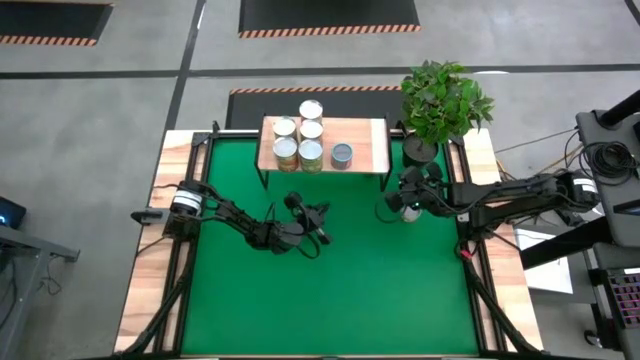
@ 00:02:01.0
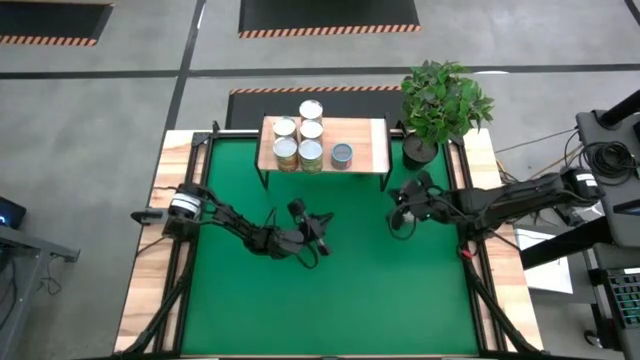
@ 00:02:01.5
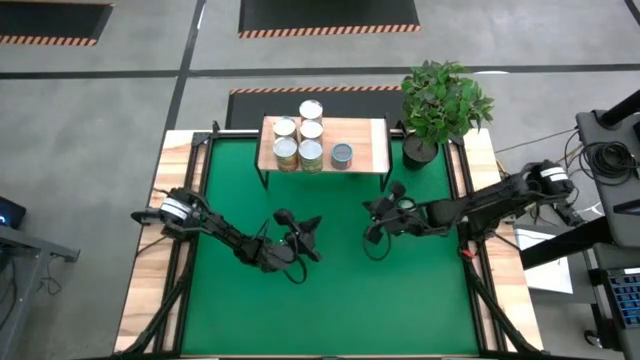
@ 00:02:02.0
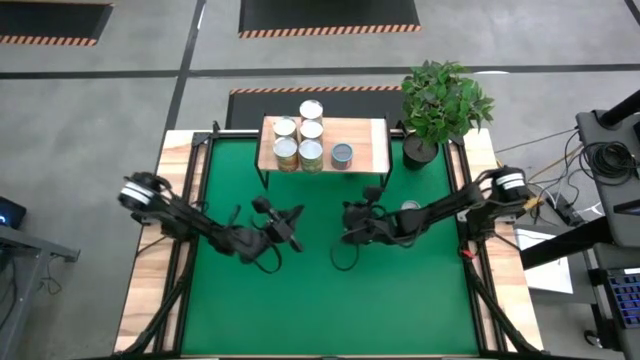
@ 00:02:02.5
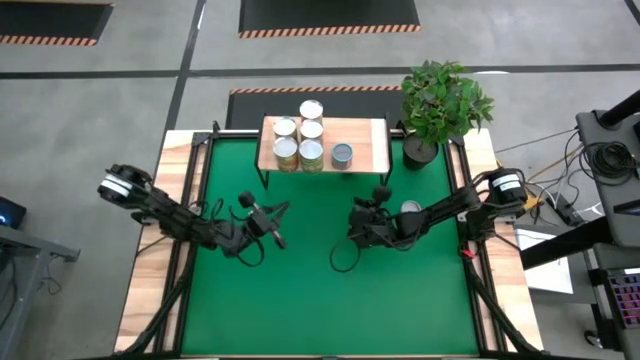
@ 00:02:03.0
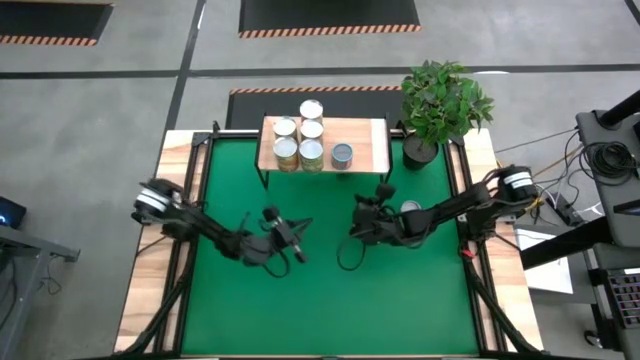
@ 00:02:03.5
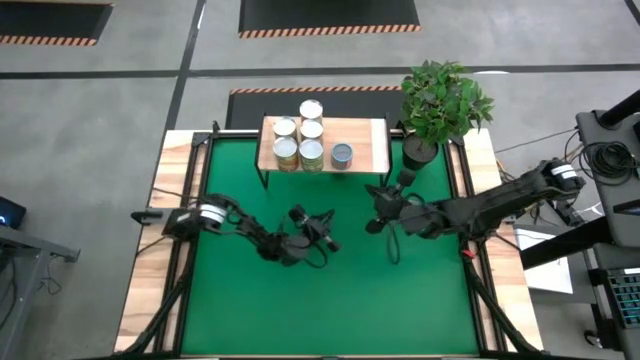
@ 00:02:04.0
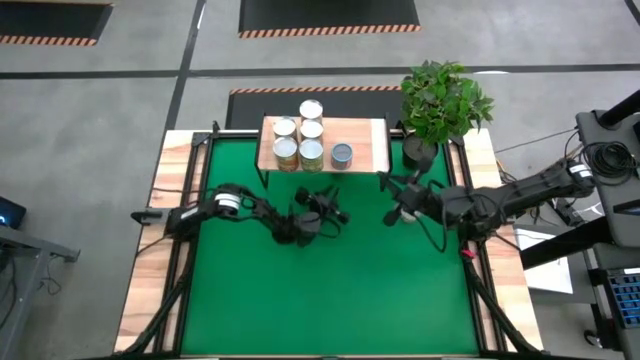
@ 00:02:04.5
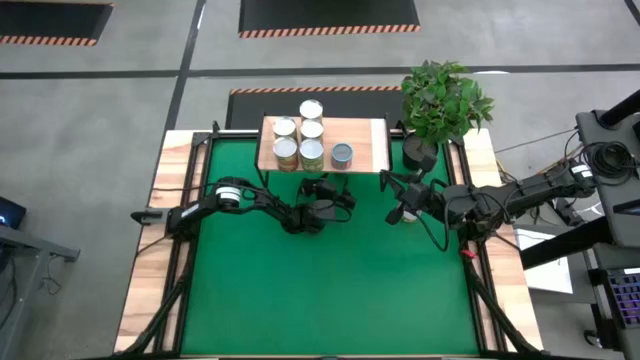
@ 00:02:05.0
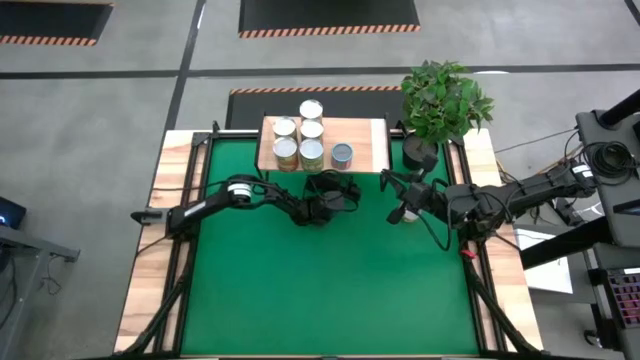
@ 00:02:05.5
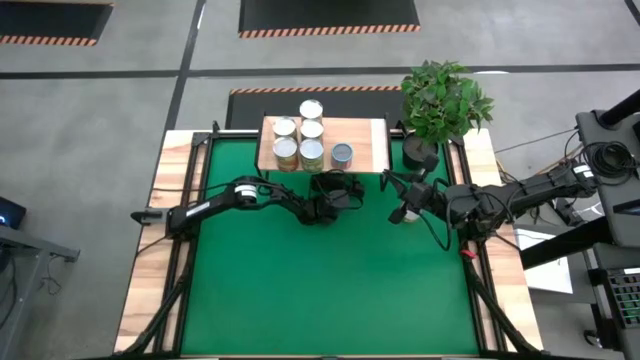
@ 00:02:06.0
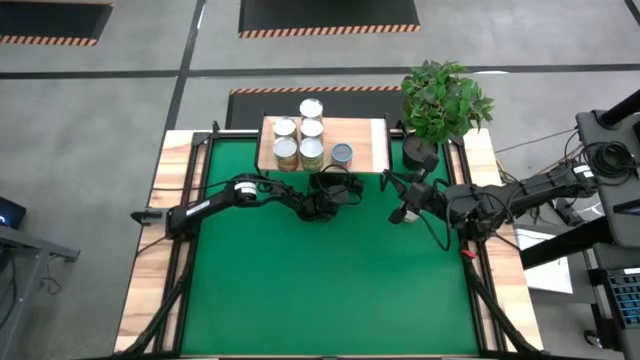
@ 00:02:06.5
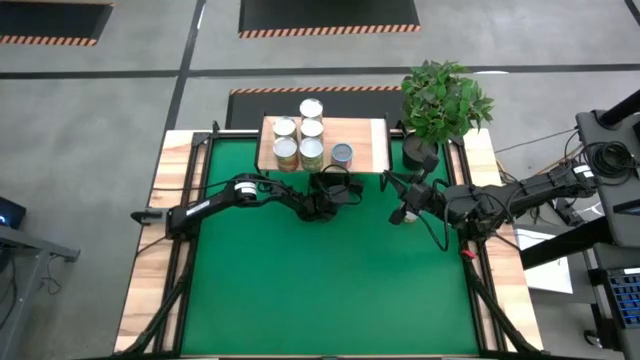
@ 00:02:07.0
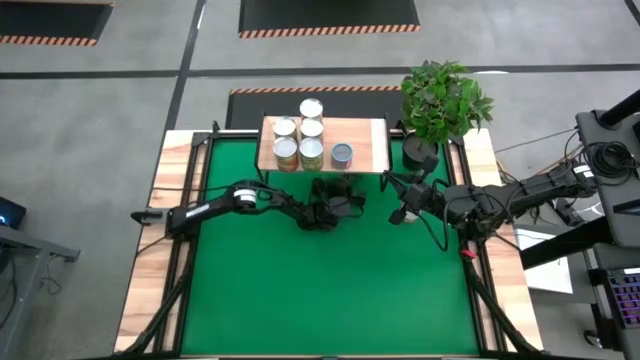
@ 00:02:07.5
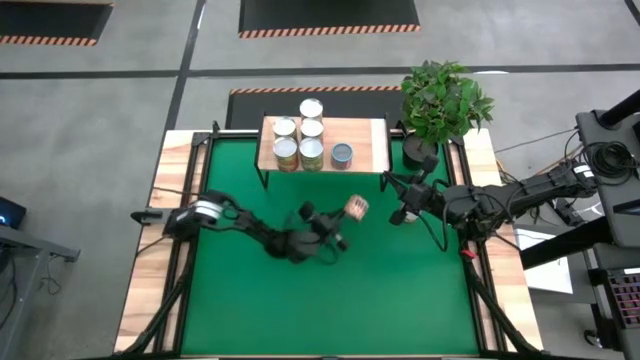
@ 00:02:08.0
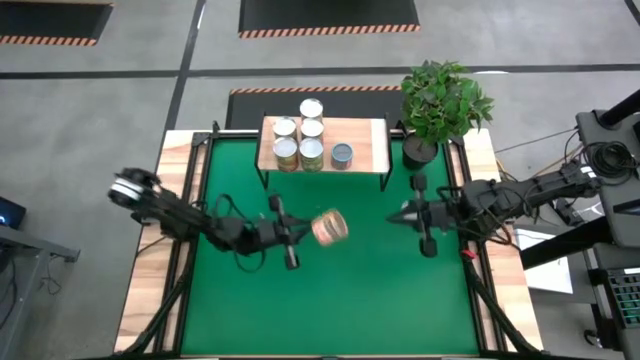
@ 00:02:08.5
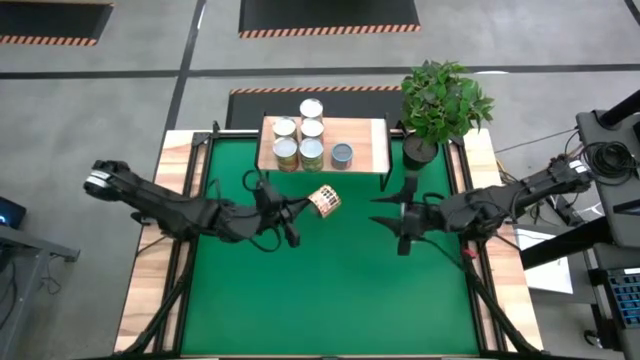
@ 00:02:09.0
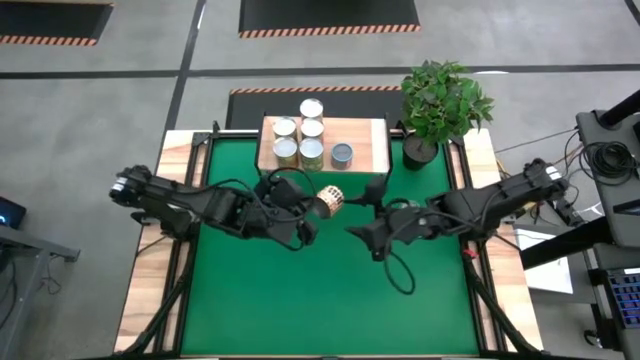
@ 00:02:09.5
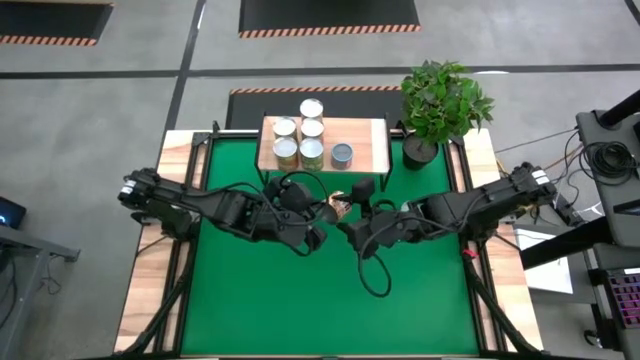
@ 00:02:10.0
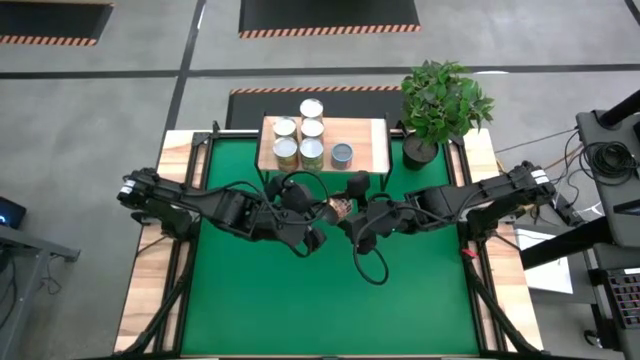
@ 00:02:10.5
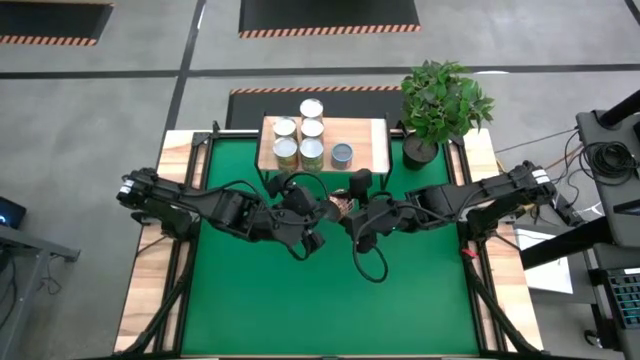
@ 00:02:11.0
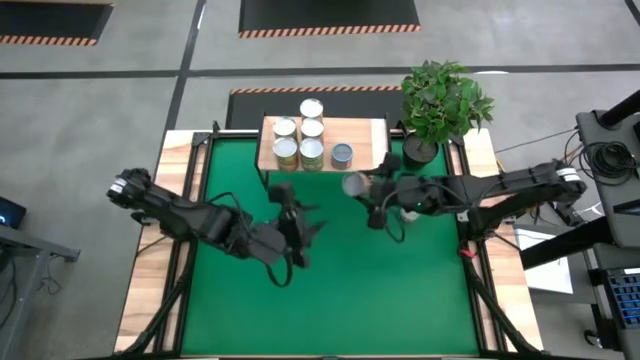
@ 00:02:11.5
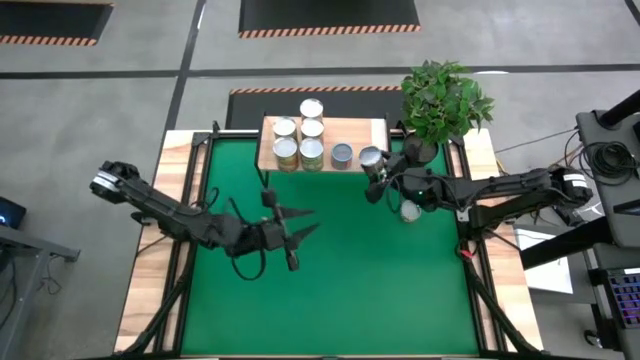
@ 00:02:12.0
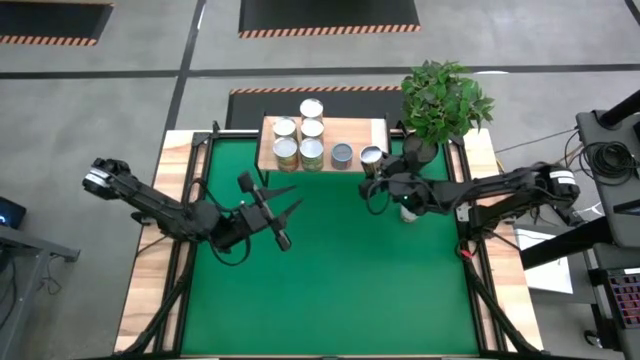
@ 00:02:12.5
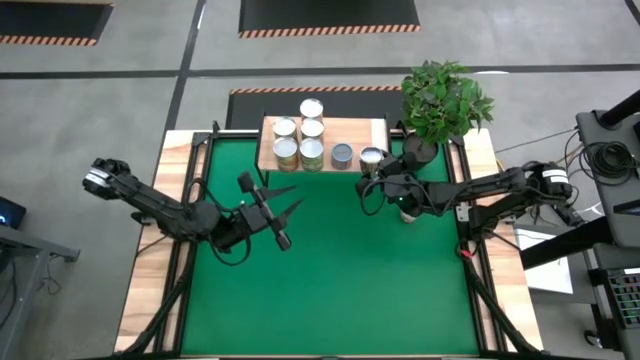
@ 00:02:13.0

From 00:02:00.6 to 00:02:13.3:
Task: Pick and place cans onto a shelf
Put the small canned beans on the shelf

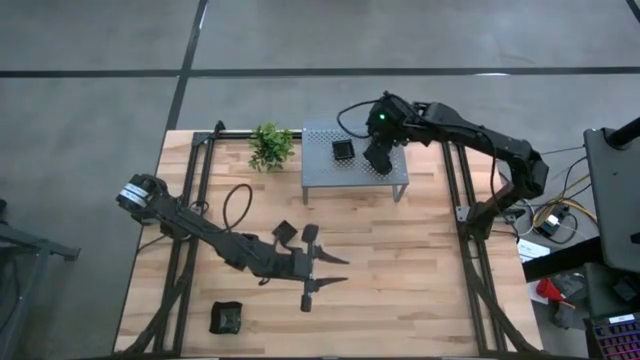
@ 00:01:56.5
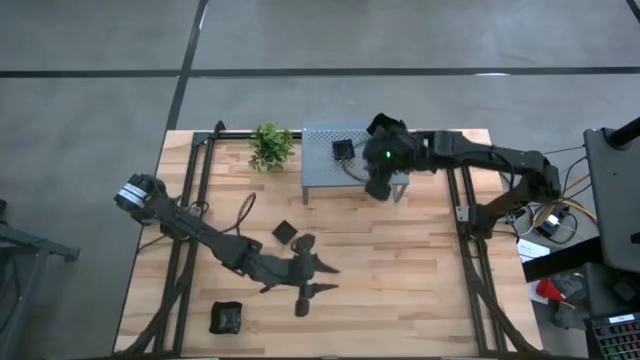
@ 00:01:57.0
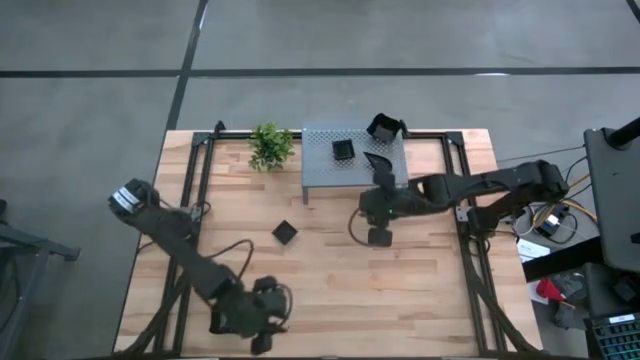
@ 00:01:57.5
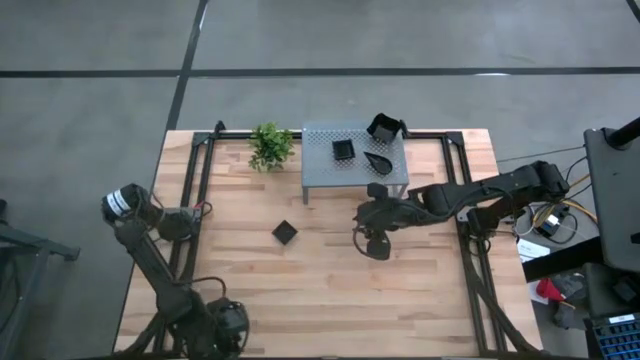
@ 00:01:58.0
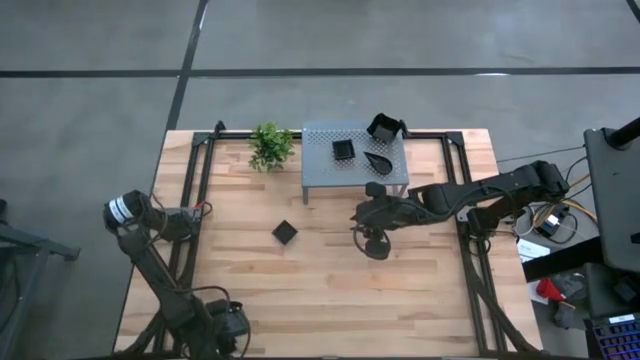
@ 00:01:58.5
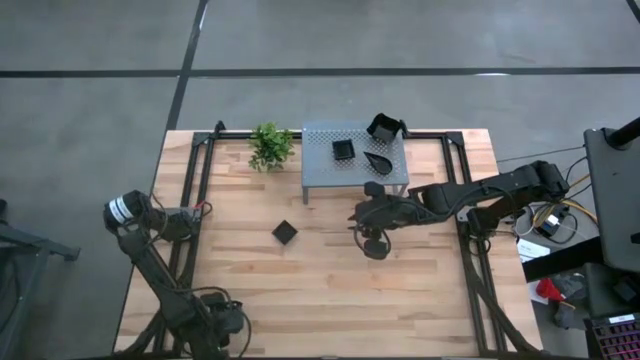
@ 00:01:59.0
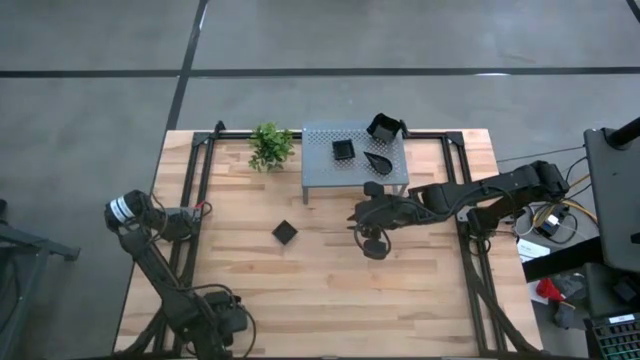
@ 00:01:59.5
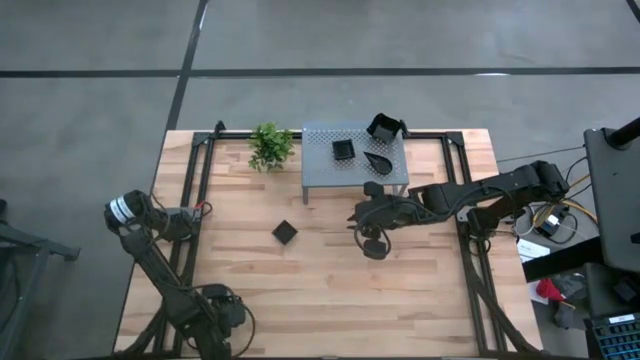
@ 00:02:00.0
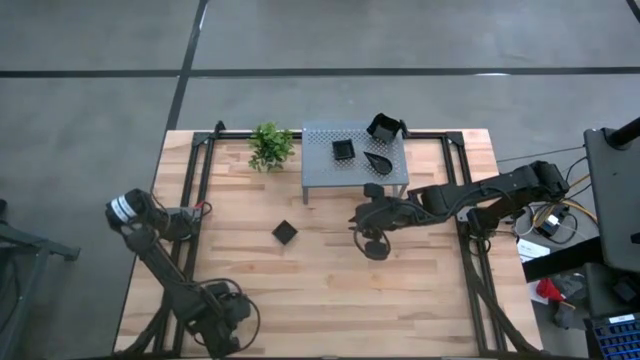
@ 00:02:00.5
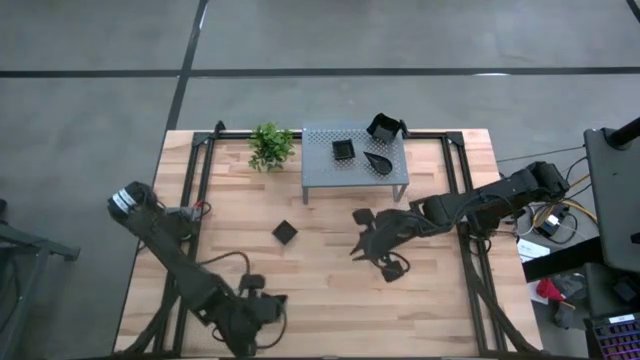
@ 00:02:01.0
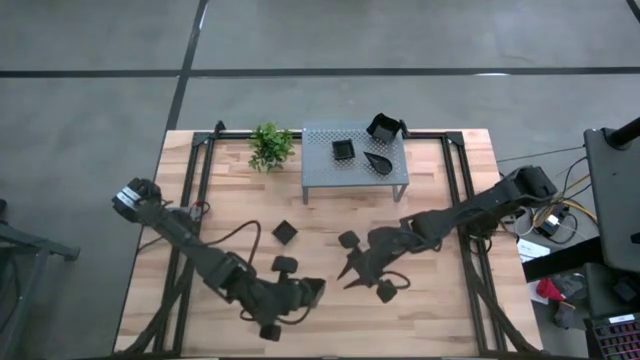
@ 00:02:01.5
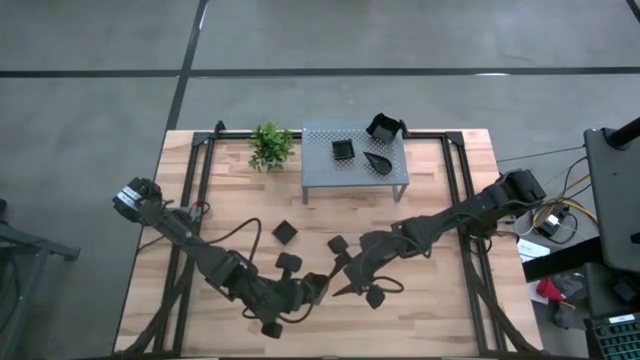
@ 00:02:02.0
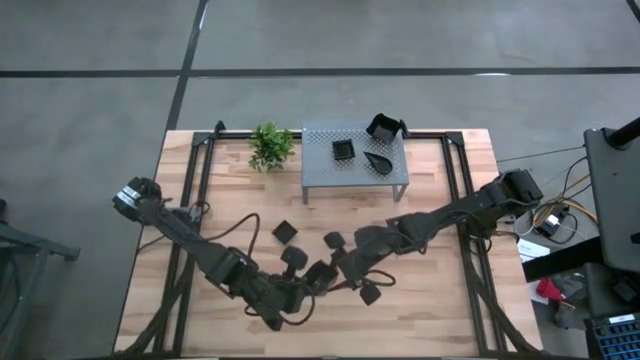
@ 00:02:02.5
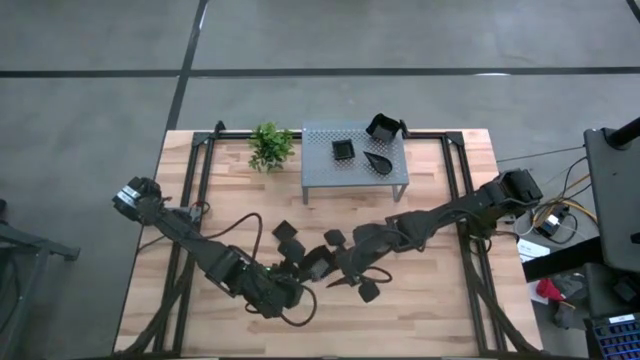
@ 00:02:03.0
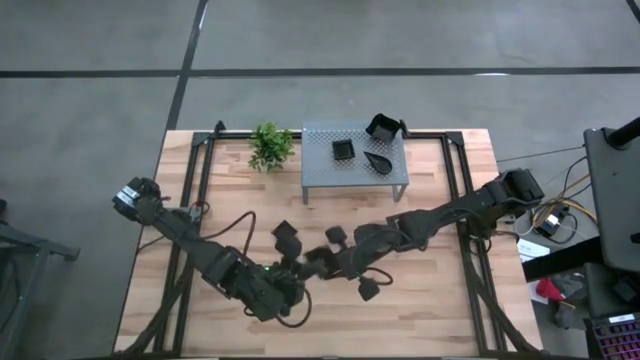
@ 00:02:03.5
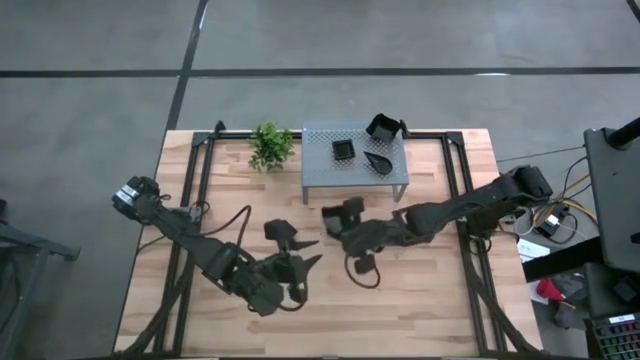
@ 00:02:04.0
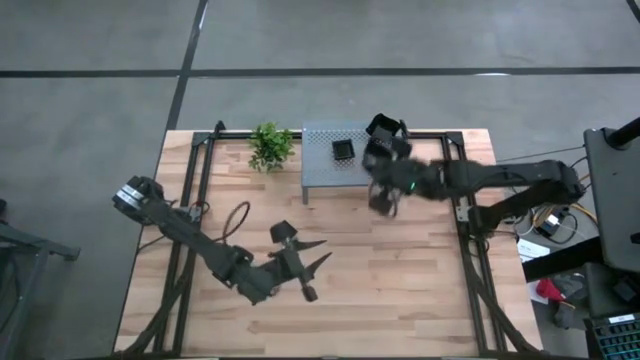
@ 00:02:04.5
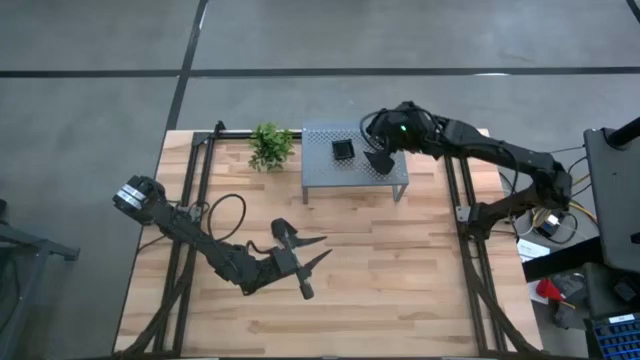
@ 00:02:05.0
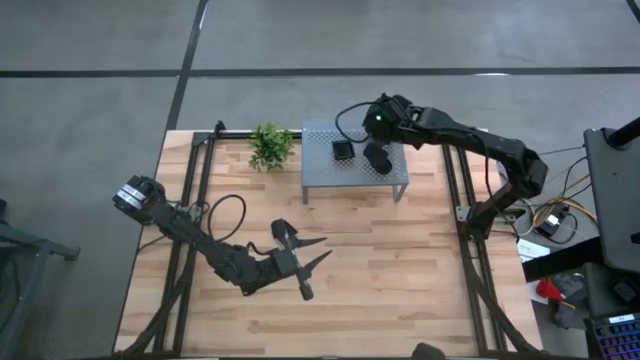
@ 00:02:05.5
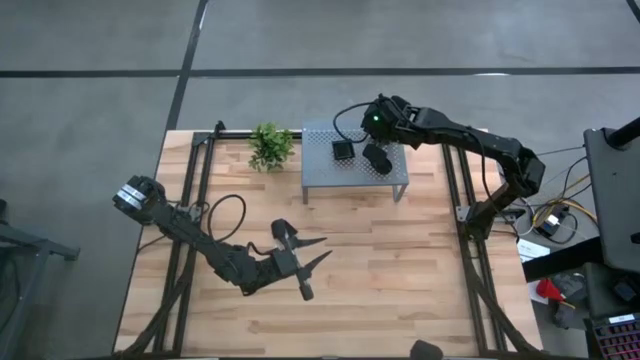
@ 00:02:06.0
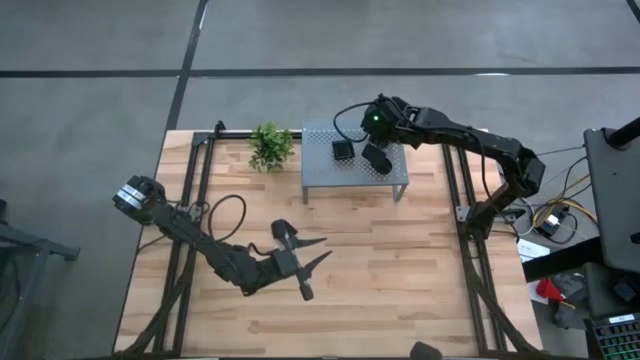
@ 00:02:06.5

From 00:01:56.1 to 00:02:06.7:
Task: Pick & Place Mini shaped plates
Stack the distorted square plate on top of the other distorted square plate on the shelf
